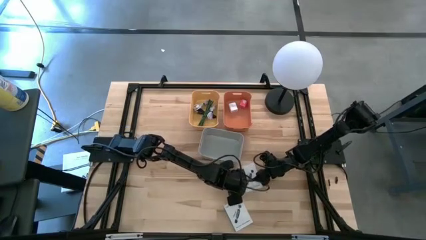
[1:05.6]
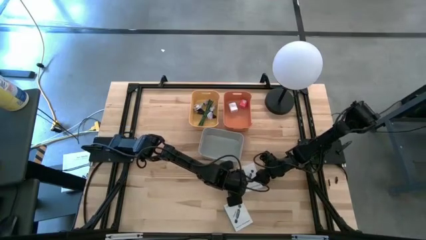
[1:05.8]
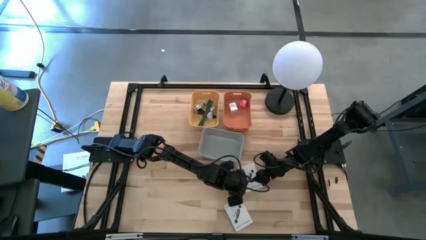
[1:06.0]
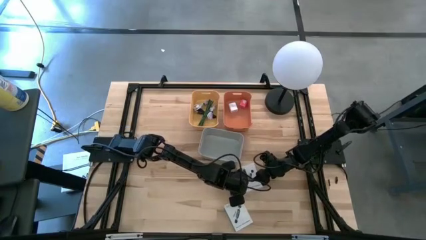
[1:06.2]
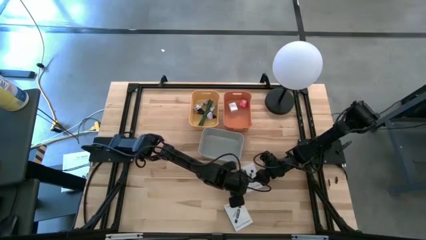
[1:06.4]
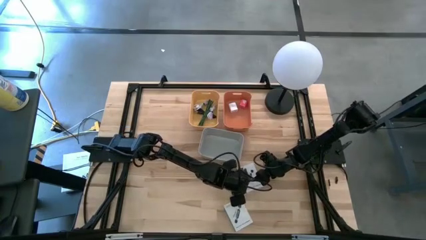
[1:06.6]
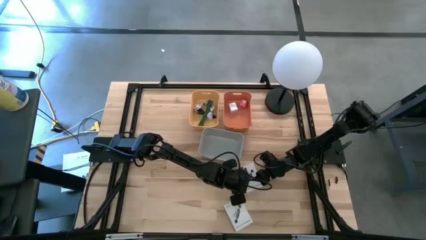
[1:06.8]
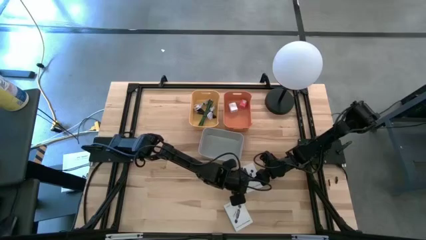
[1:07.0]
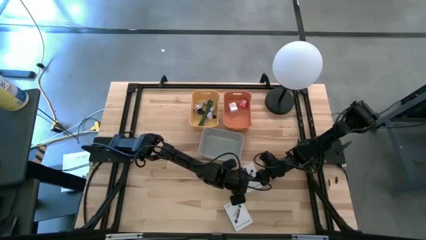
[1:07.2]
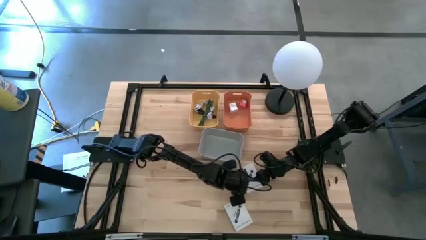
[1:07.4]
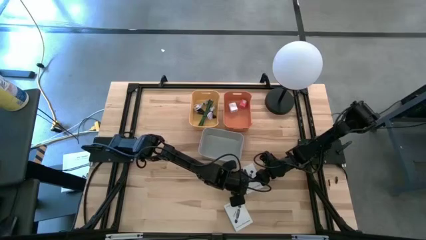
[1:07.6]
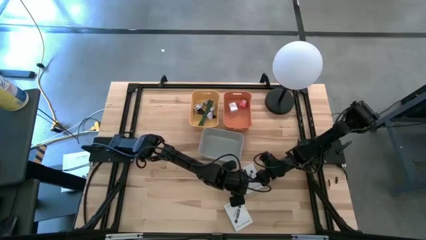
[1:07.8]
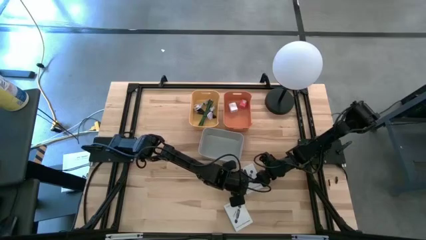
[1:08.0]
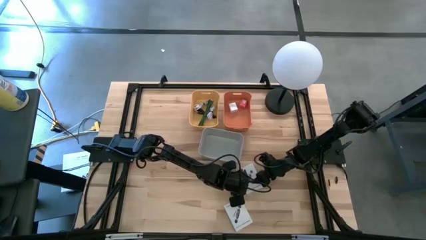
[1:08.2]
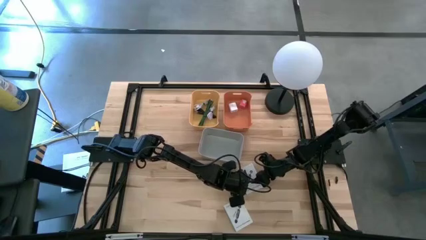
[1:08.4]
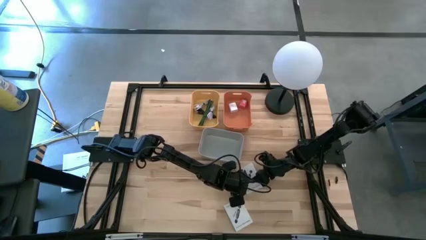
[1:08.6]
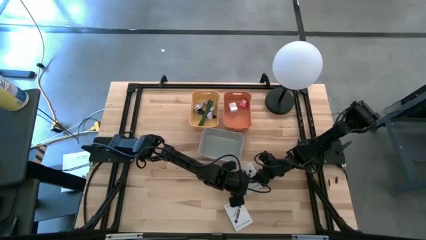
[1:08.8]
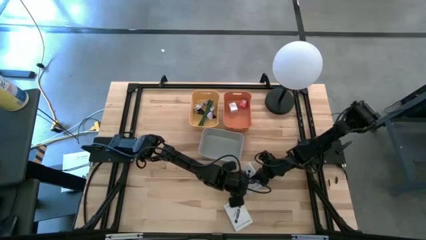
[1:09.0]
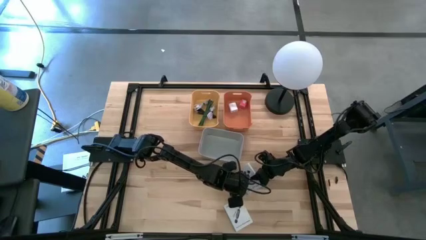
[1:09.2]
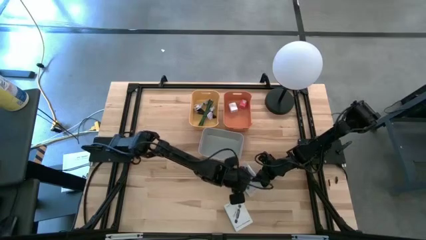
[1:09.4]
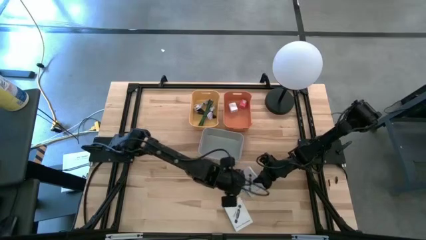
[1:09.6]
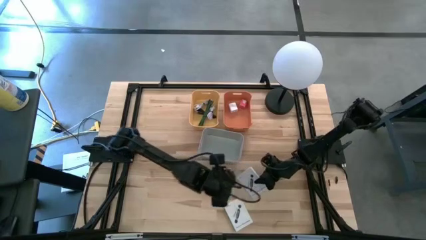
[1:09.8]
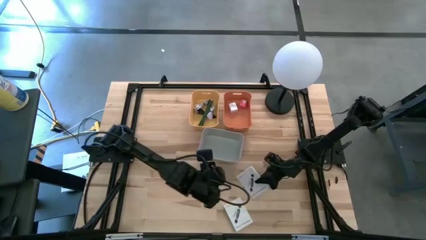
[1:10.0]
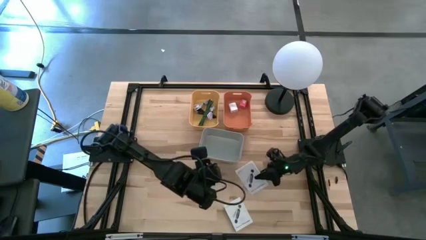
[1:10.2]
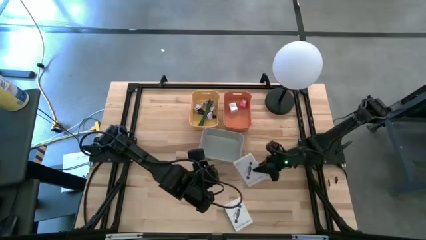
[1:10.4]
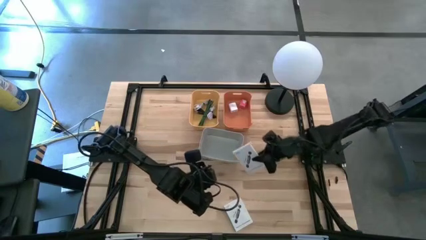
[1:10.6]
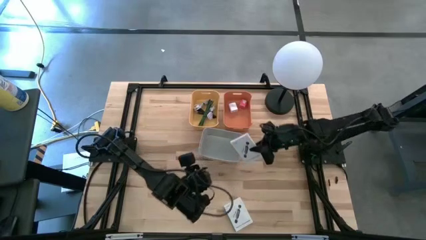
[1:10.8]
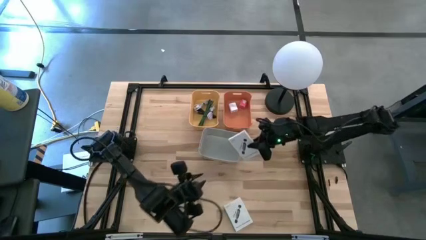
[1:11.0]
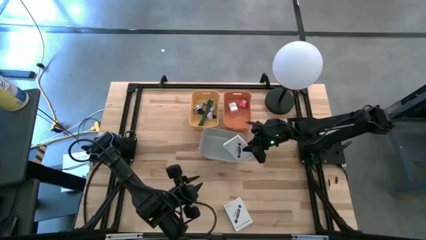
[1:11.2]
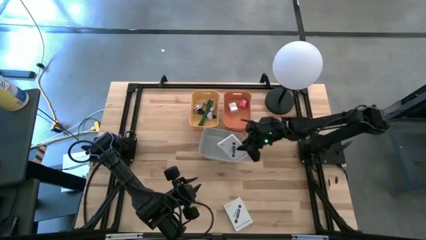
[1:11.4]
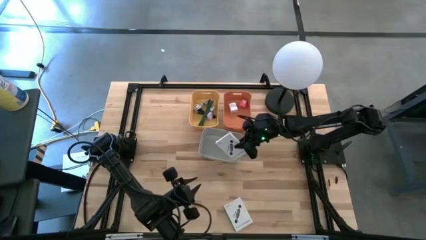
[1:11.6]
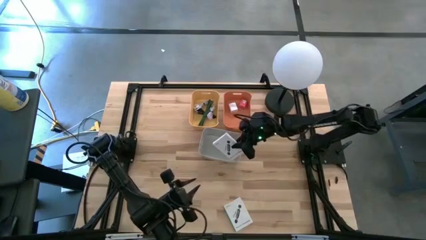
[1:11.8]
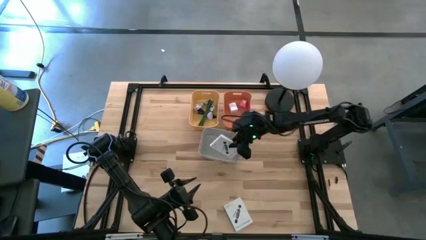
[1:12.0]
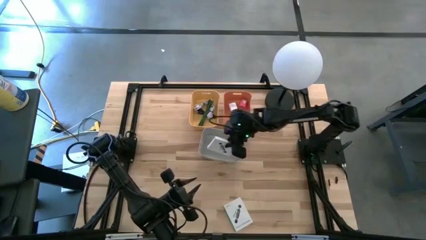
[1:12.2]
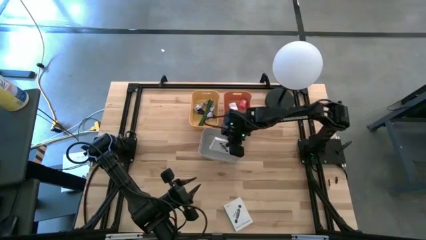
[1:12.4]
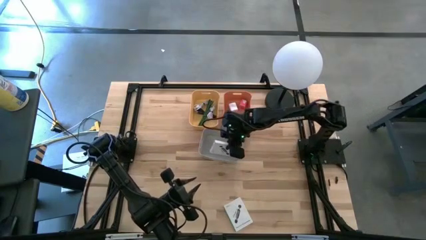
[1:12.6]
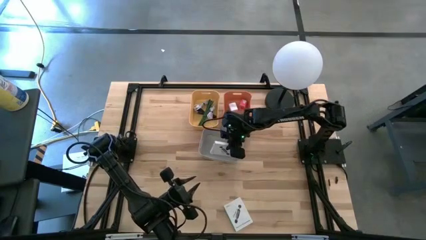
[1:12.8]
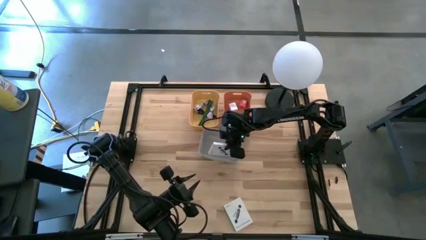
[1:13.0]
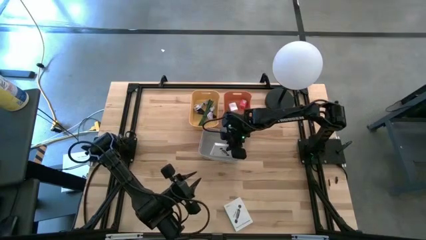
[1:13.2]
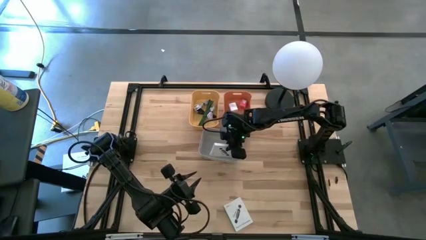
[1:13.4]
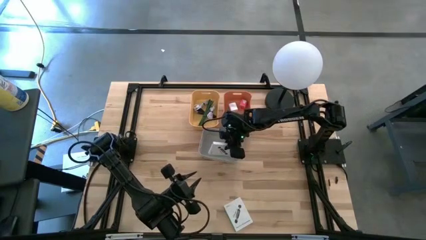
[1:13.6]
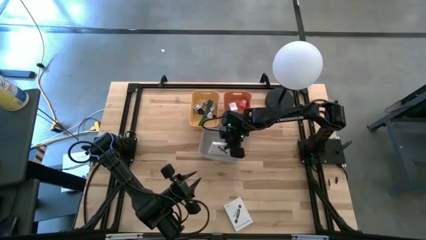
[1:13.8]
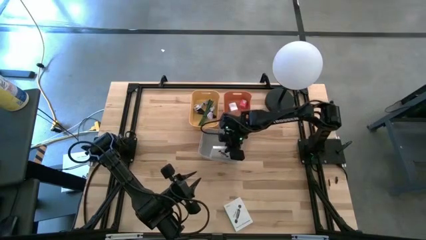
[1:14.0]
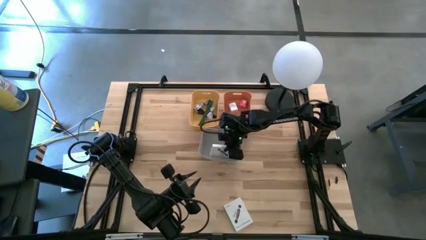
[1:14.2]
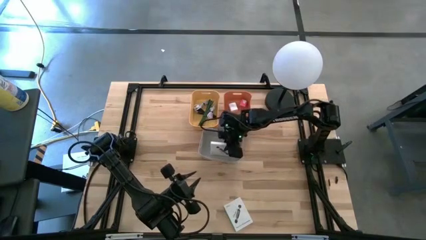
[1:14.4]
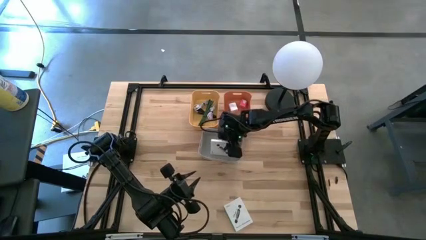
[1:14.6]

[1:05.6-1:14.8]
Task: Pick and place items into bin
Put the right card reader box into the gray bin
